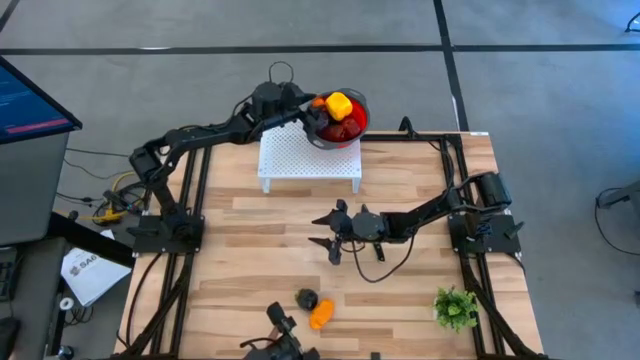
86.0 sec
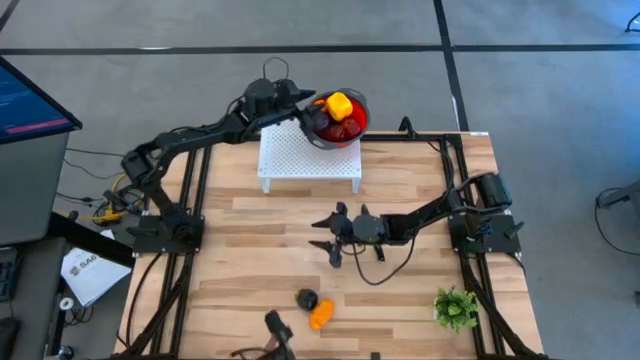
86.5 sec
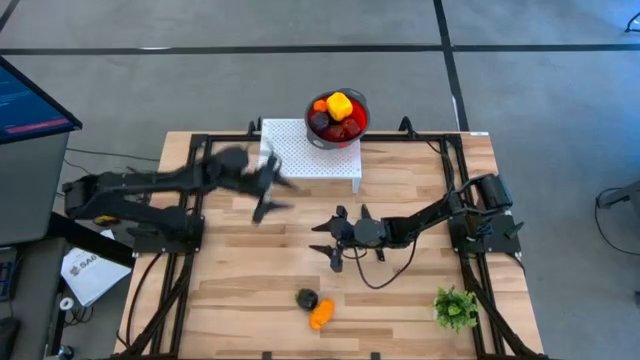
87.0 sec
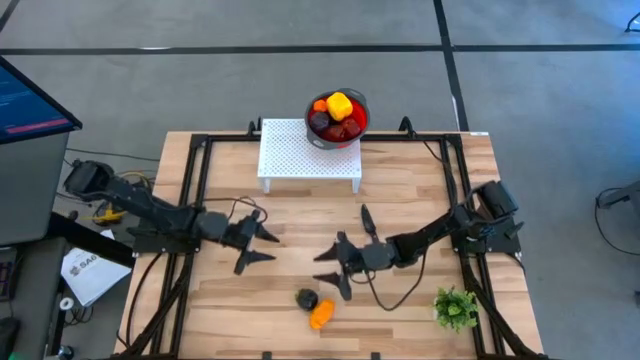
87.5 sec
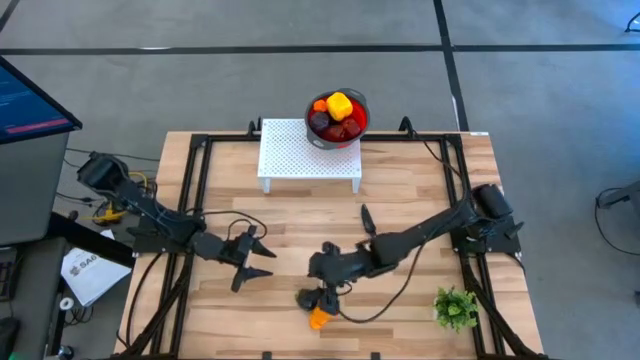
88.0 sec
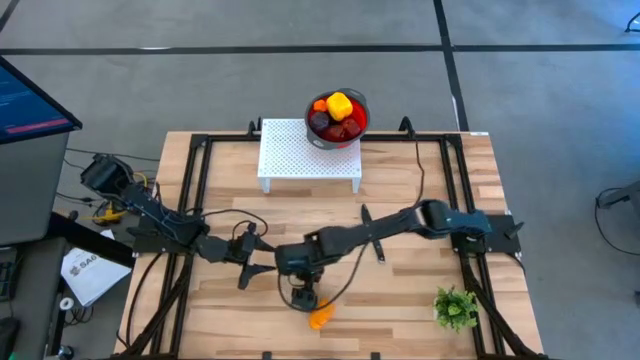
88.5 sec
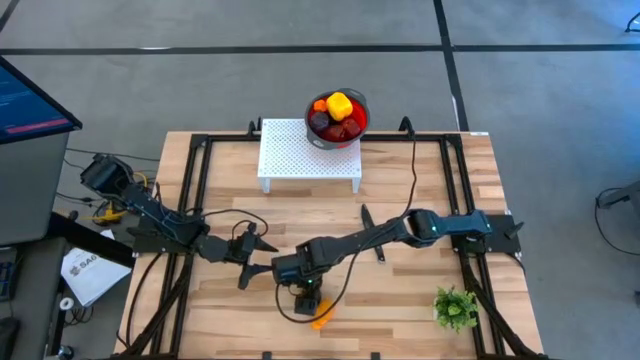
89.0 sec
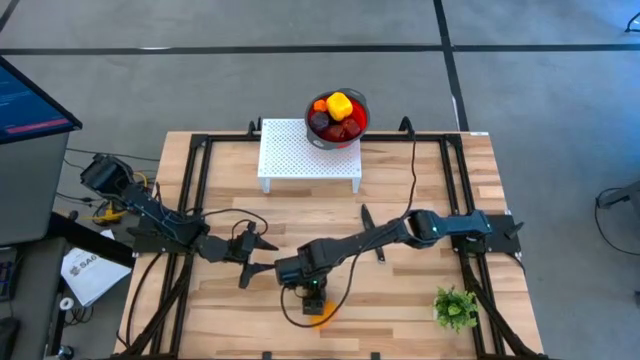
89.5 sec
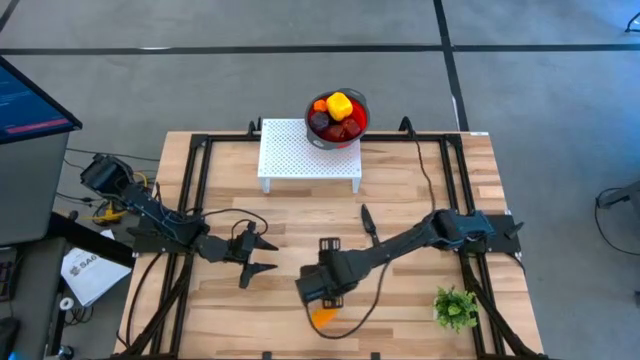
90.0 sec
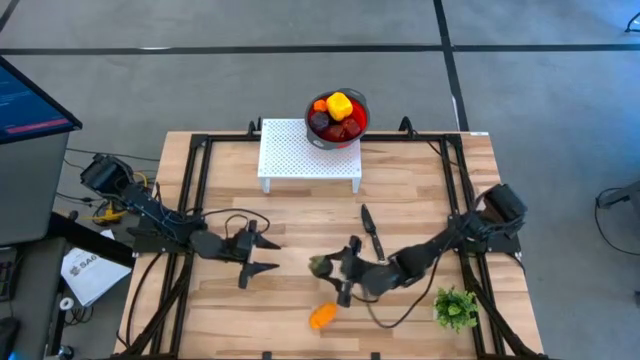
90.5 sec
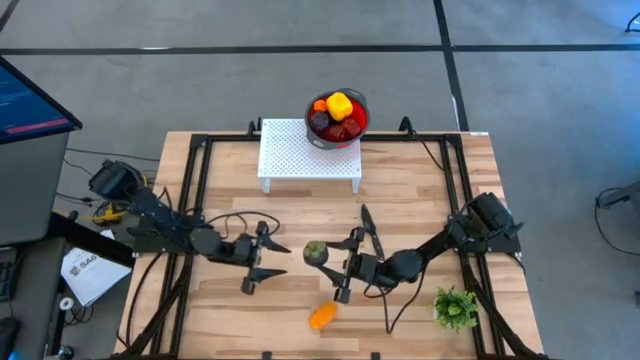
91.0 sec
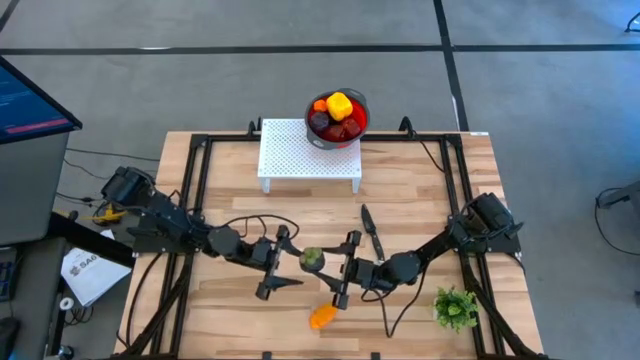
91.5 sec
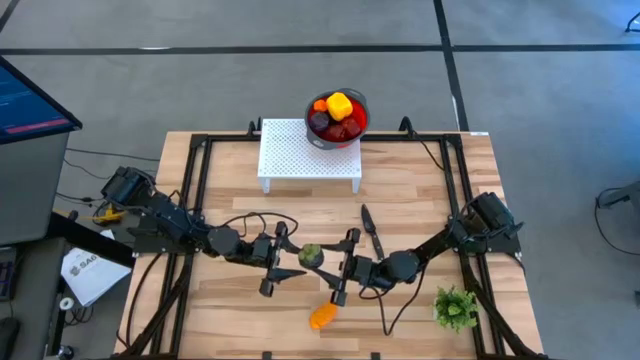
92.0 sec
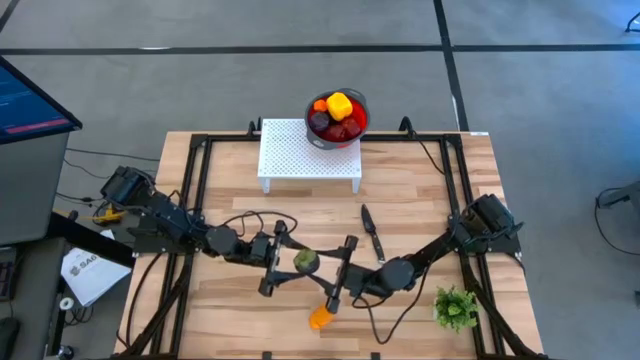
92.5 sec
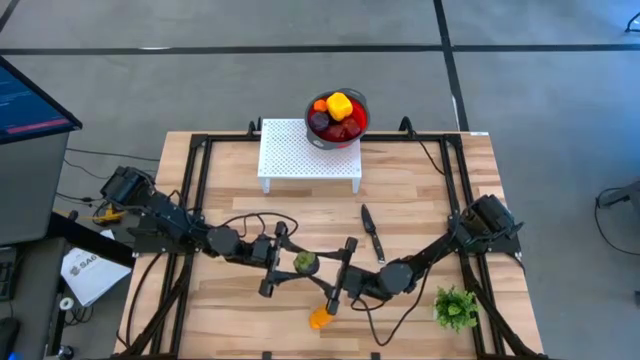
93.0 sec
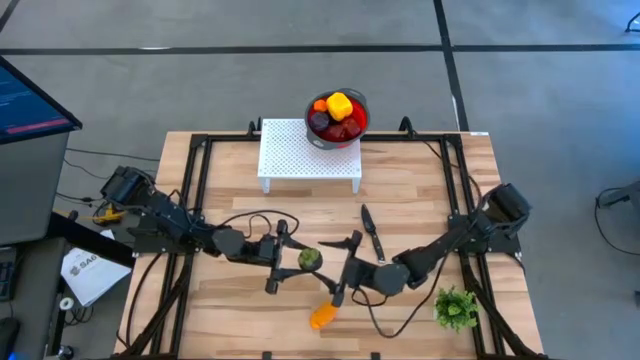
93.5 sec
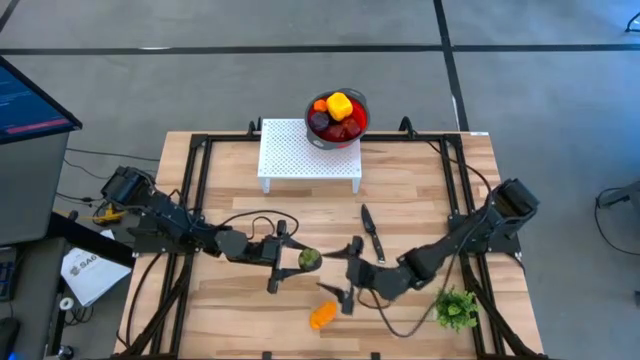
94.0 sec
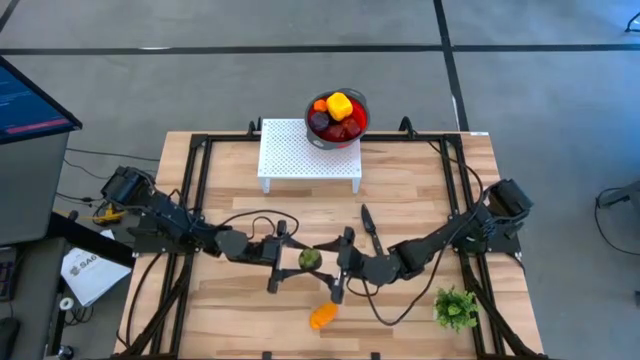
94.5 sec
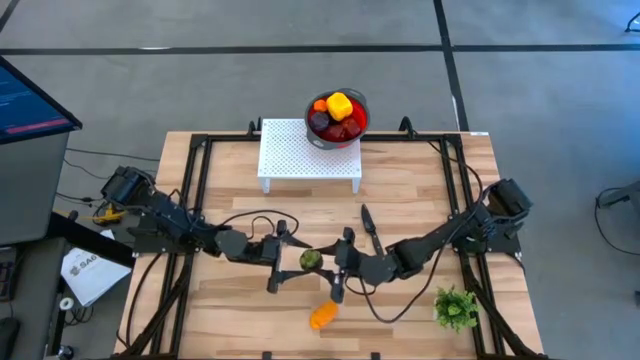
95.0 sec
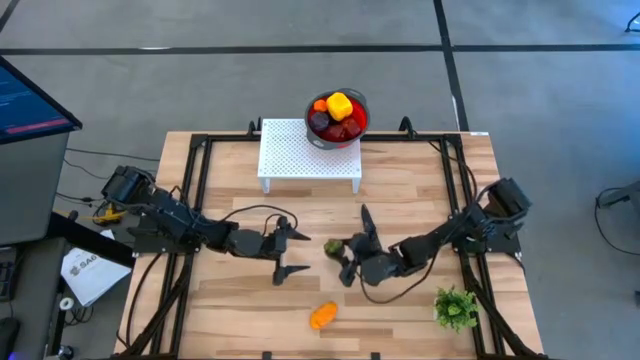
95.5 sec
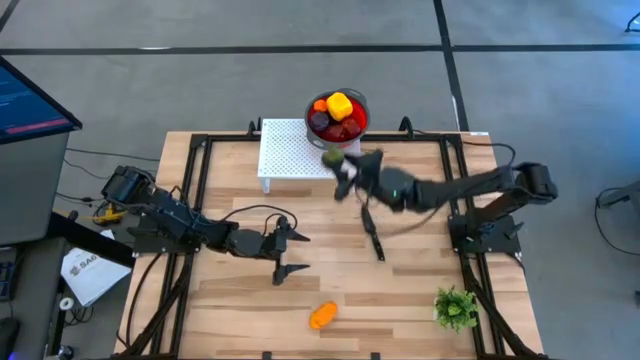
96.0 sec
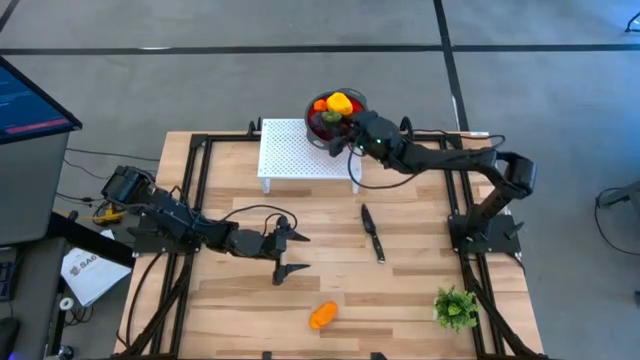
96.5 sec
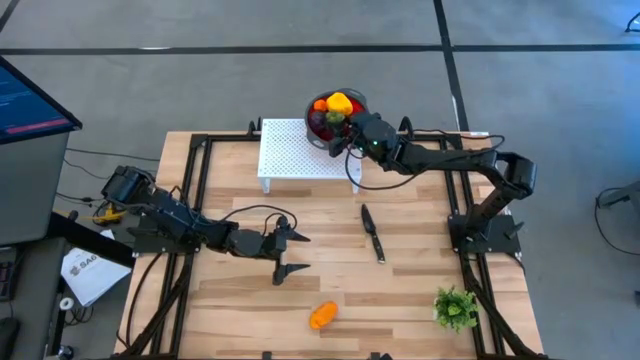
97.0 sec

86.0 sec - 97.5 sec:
Task: Pick & Place Fruit
Put the black mangosteen into the strainer bowl on the shelf

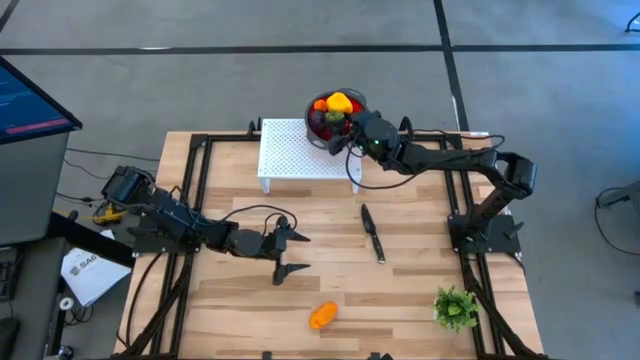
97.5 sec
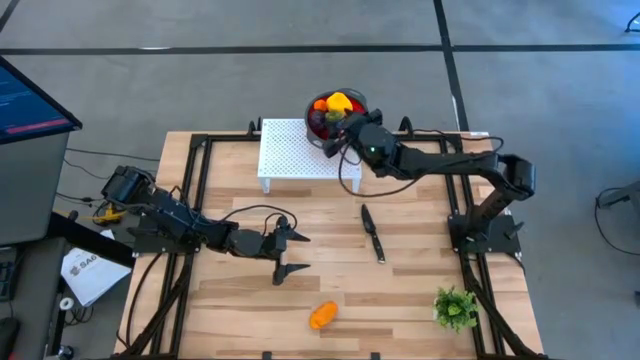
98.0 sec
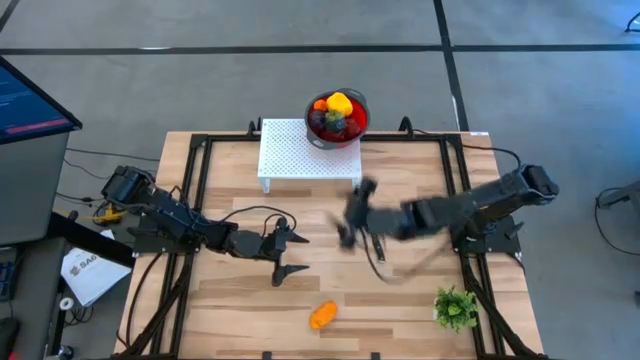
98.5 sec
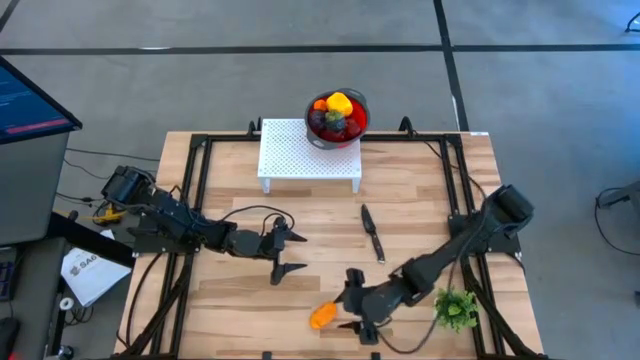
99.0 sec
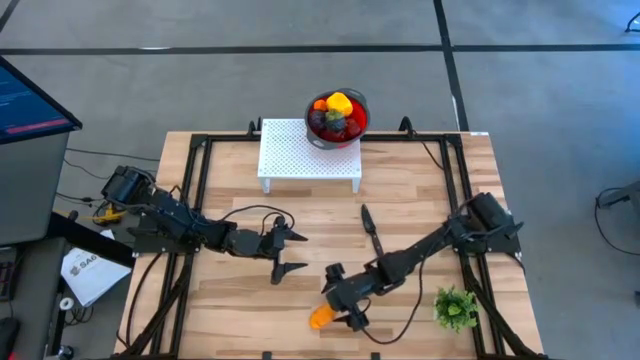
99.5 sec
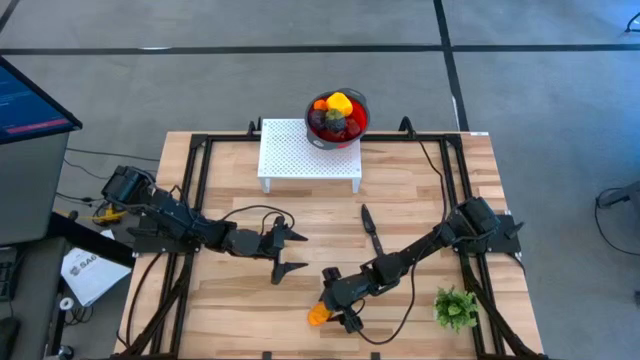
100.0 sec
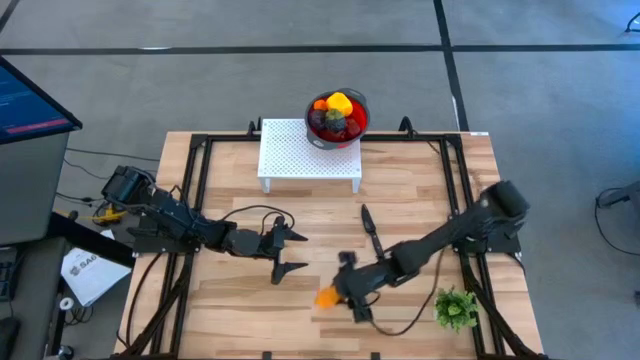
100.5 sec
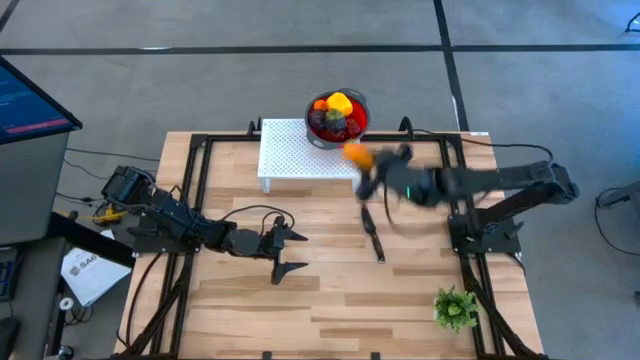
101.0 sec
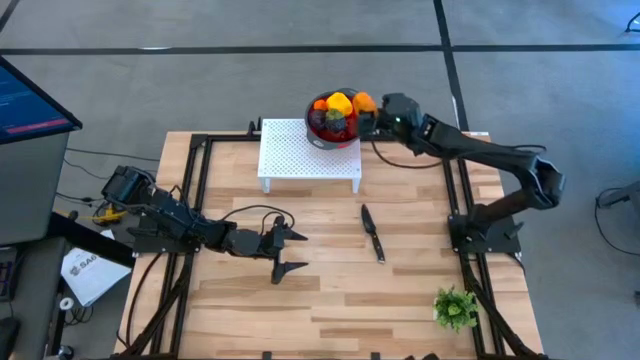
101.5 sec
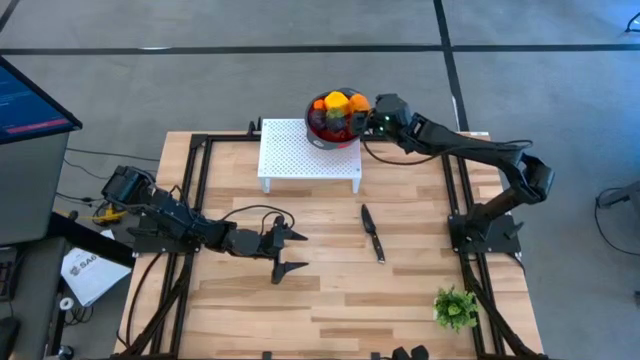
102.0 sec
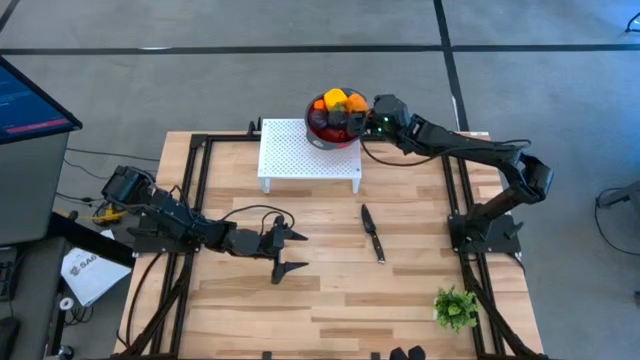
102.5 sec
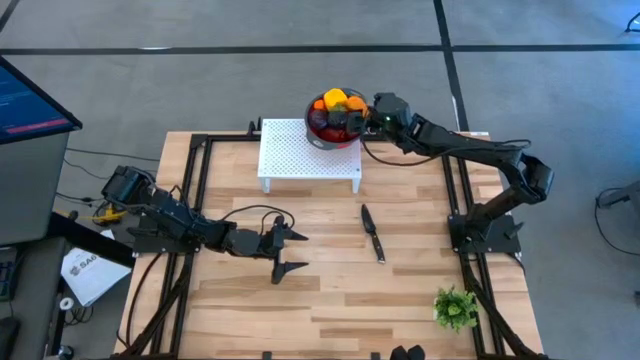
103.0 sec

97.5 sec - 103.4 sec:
Put the orange mango into the strainer bowl on the shelf

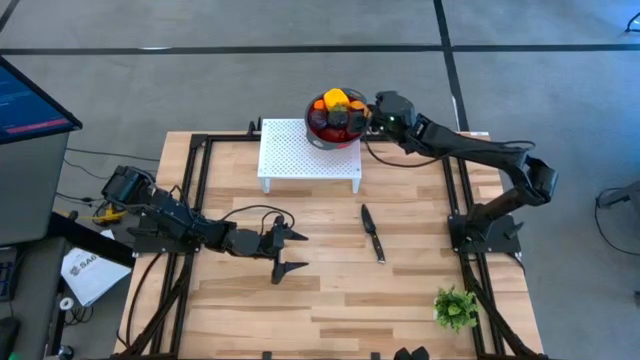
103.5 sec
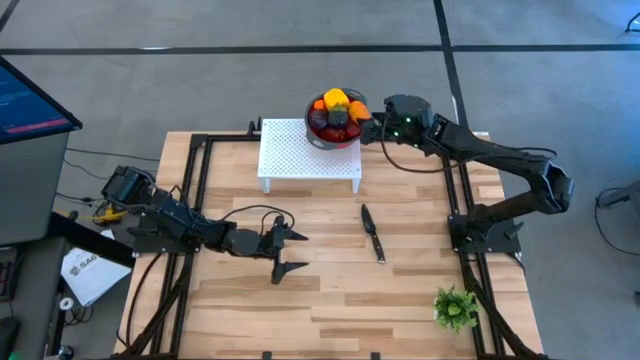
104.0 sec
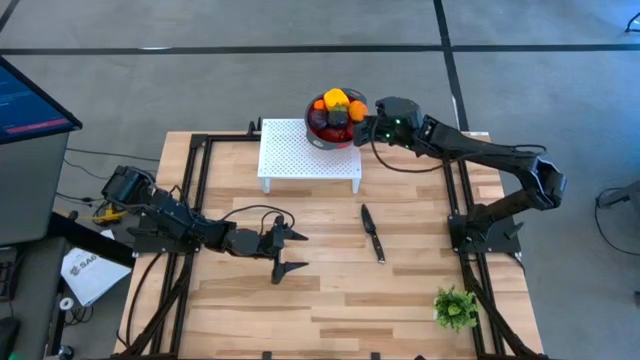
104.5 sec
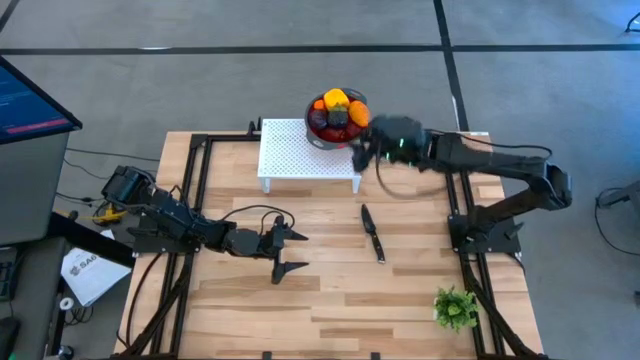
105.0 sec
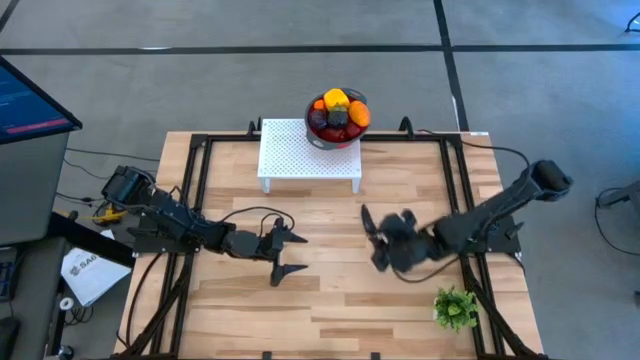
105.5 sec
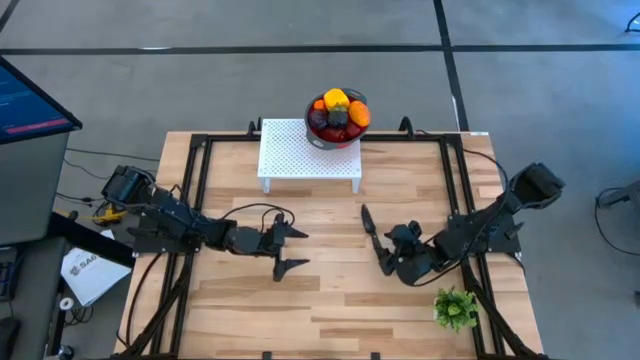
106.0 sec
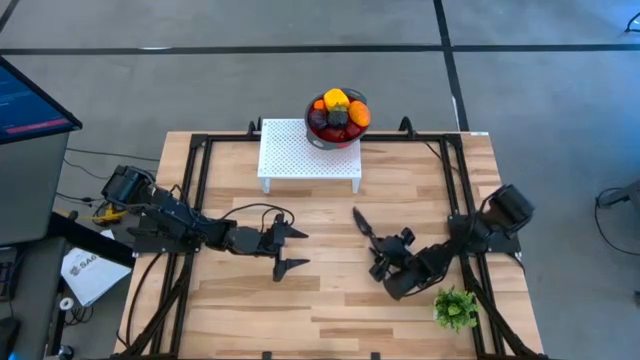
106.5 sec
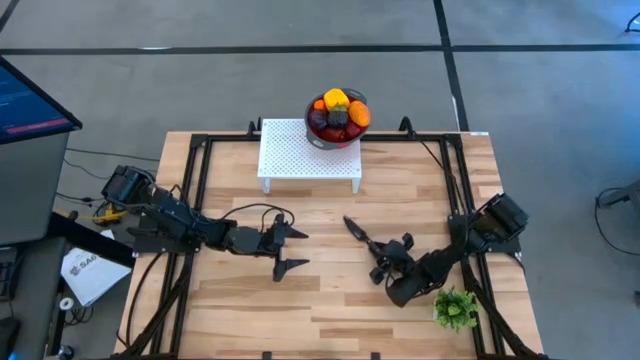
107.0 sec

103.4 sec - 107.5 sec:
Put the black knife on the shelf

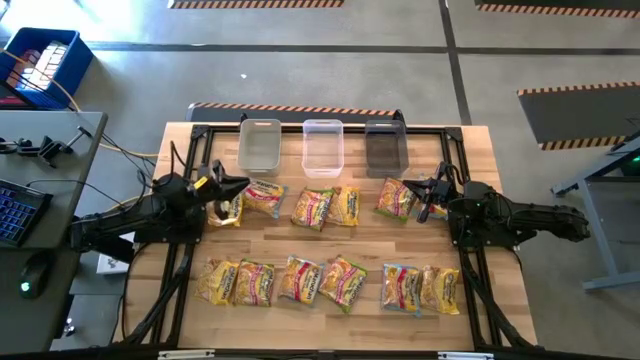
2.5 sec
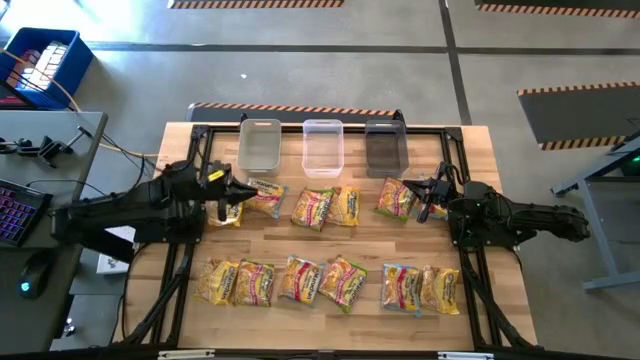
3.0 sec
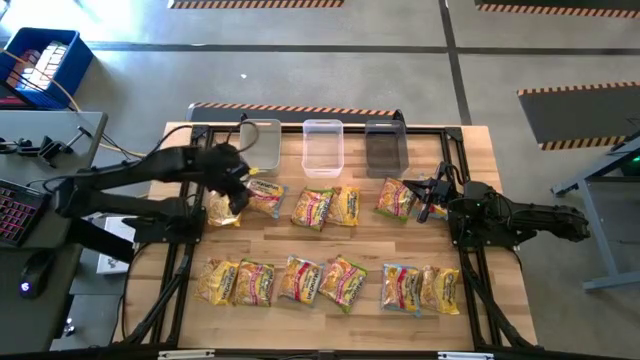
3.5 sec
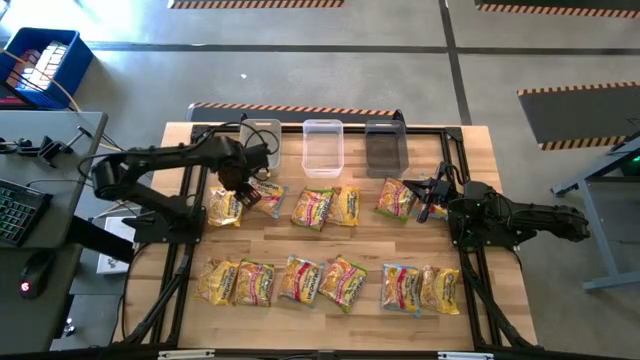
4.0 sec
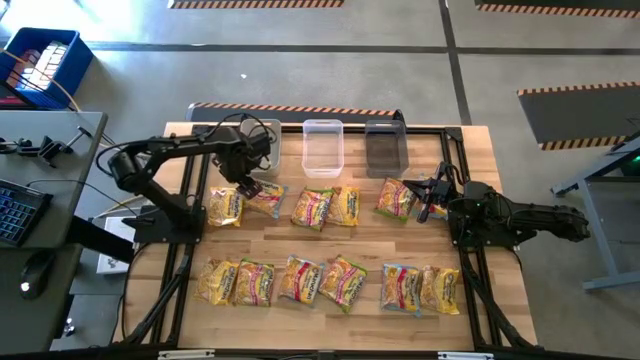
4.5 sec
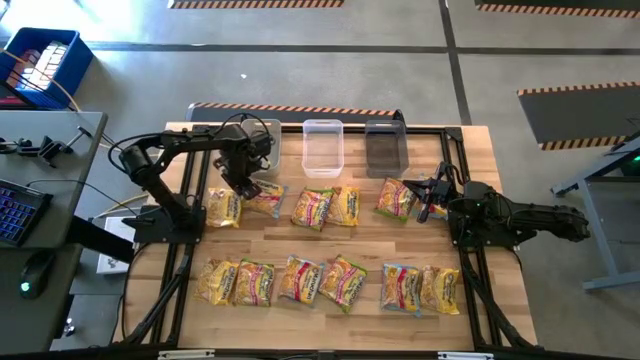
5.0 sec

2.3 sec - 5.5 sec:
Task: Sort Maruchan noodles
Put the top left yellow noodle pack into the gray bin
